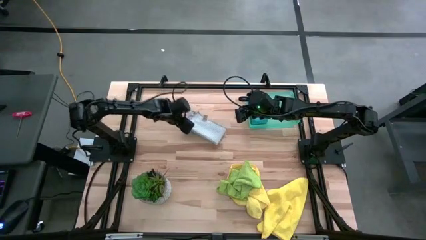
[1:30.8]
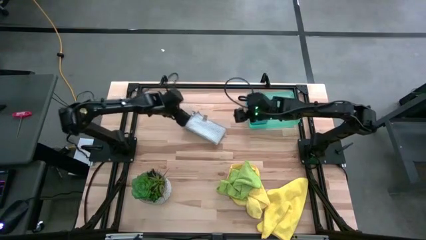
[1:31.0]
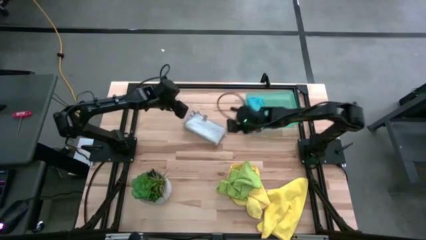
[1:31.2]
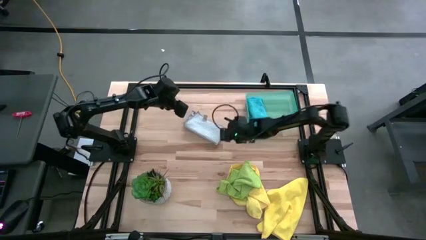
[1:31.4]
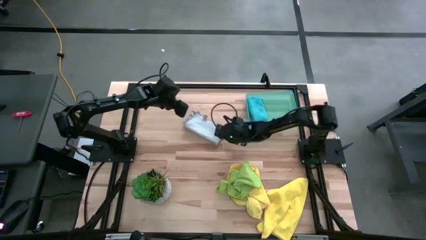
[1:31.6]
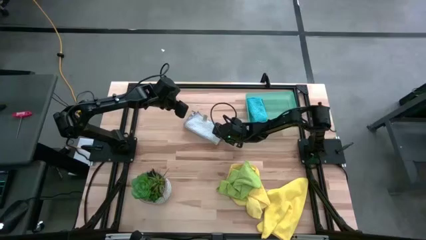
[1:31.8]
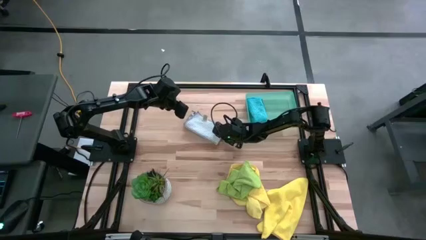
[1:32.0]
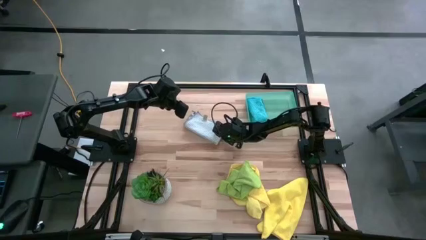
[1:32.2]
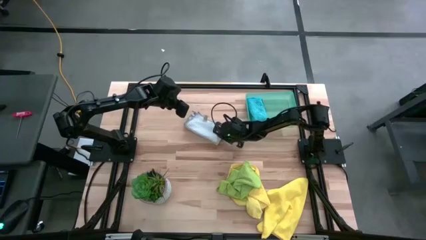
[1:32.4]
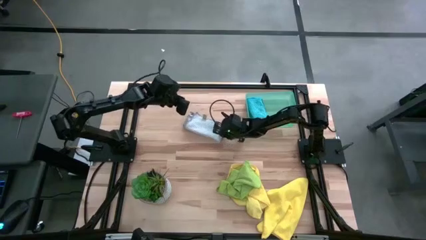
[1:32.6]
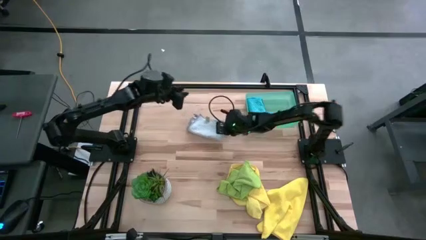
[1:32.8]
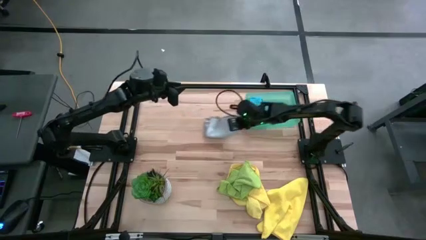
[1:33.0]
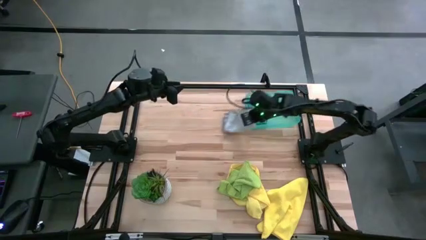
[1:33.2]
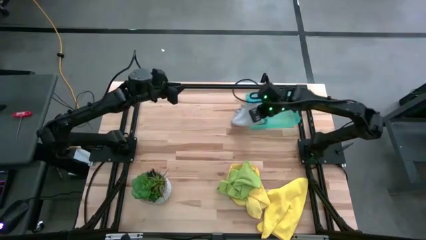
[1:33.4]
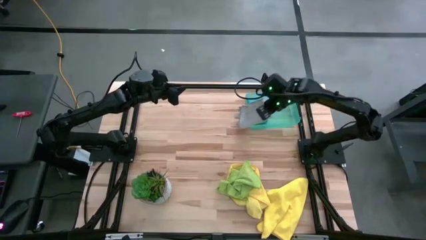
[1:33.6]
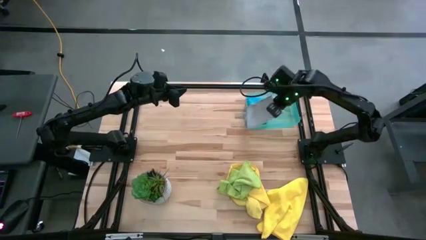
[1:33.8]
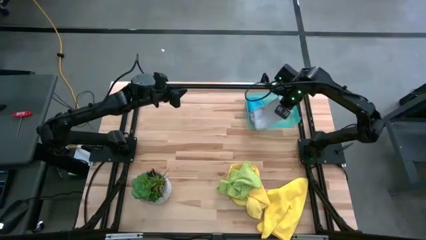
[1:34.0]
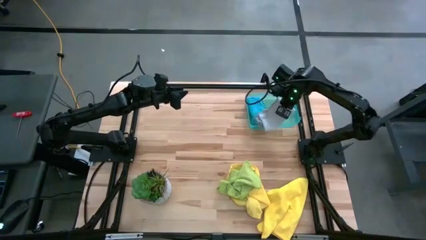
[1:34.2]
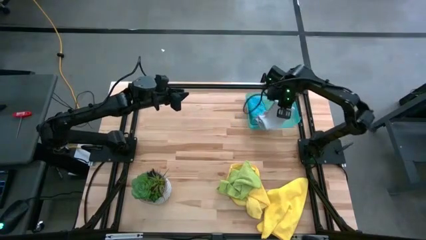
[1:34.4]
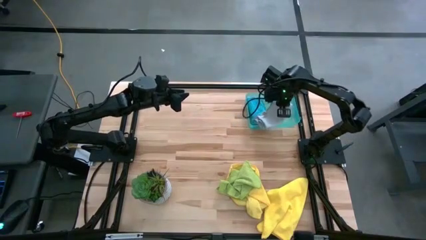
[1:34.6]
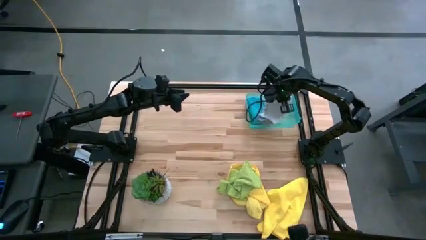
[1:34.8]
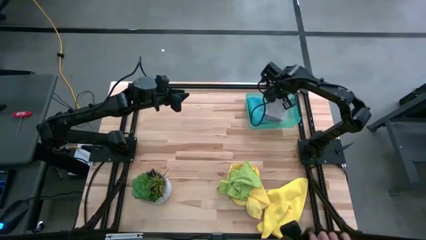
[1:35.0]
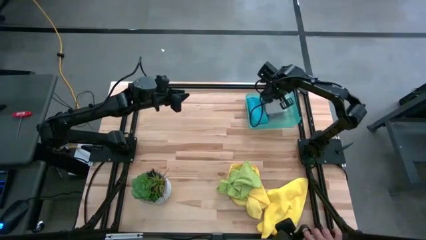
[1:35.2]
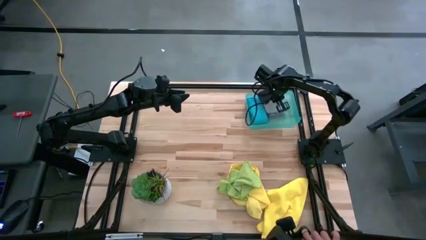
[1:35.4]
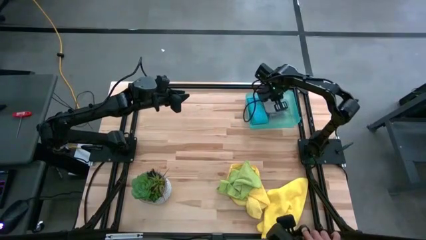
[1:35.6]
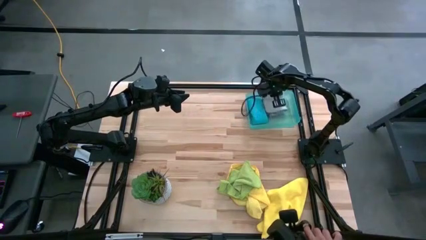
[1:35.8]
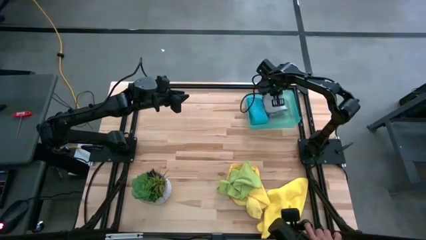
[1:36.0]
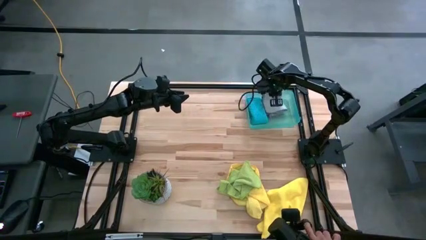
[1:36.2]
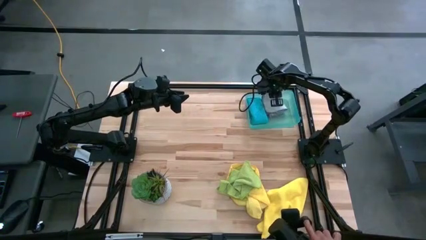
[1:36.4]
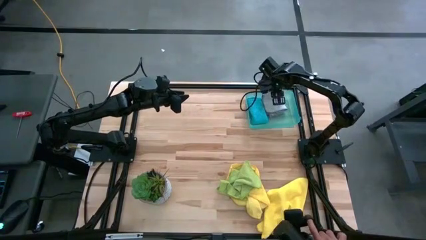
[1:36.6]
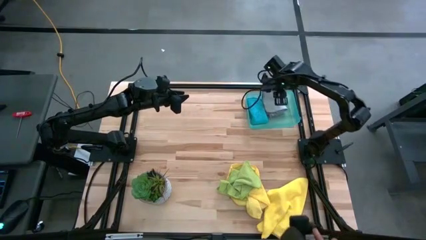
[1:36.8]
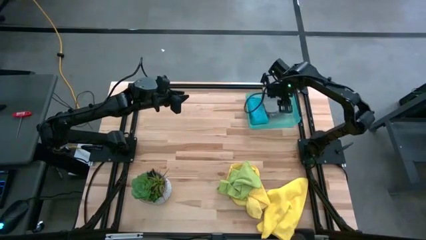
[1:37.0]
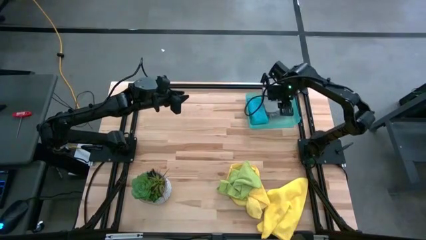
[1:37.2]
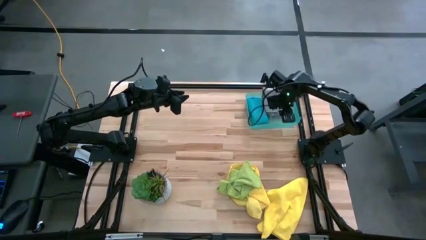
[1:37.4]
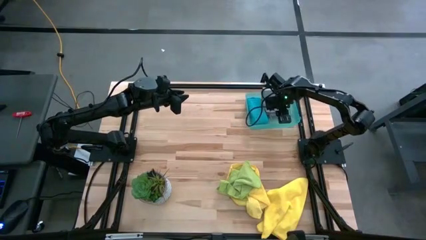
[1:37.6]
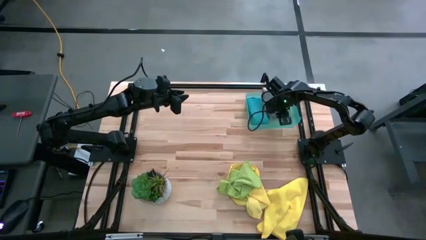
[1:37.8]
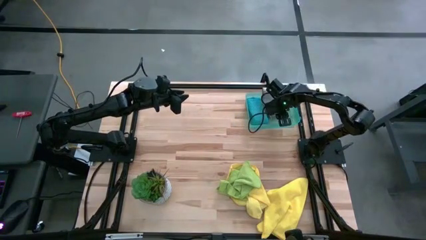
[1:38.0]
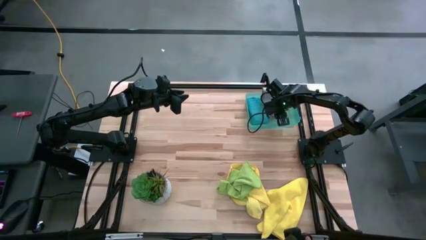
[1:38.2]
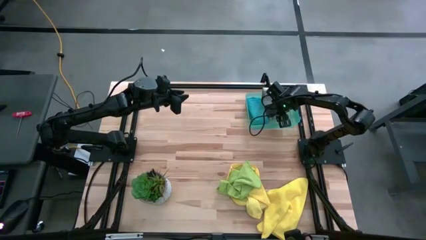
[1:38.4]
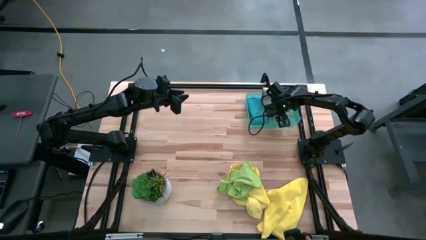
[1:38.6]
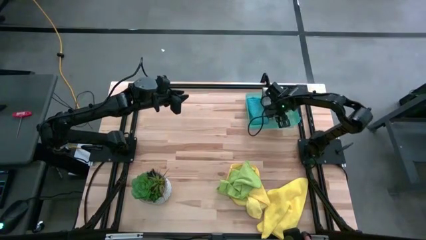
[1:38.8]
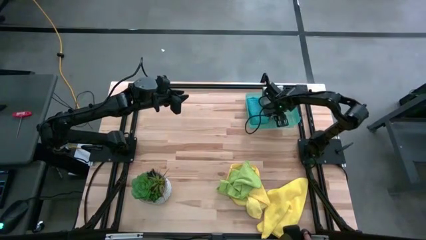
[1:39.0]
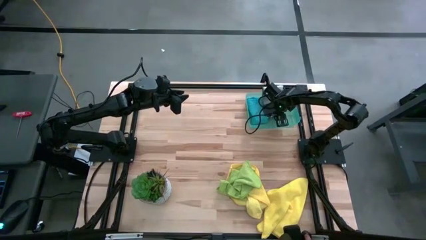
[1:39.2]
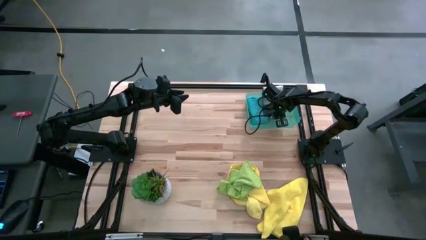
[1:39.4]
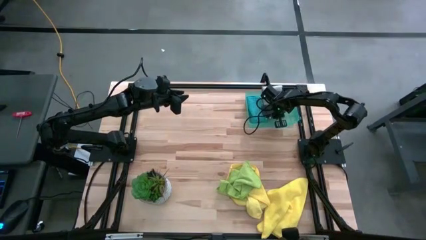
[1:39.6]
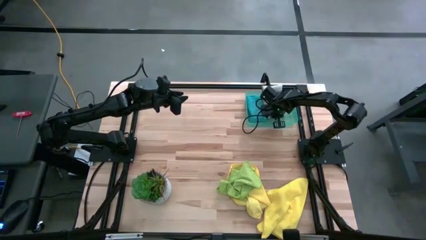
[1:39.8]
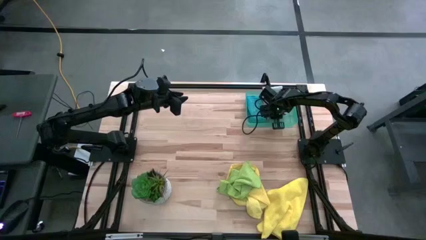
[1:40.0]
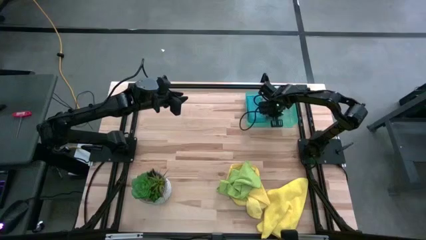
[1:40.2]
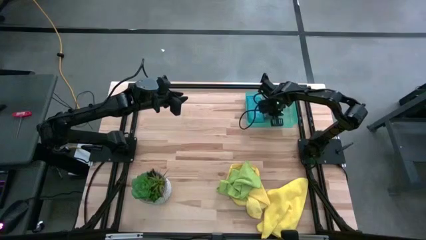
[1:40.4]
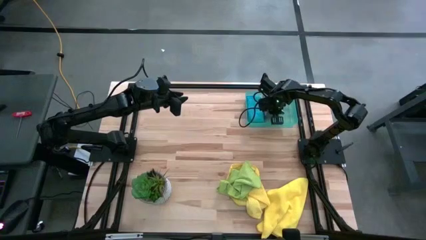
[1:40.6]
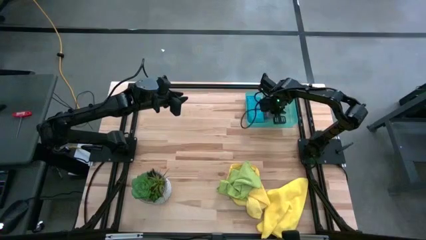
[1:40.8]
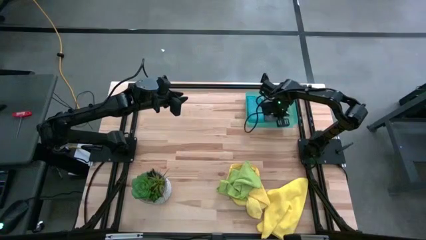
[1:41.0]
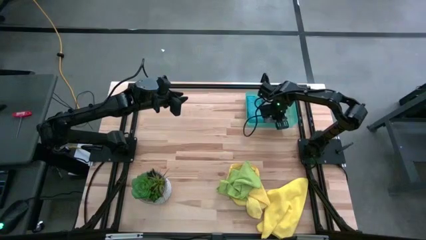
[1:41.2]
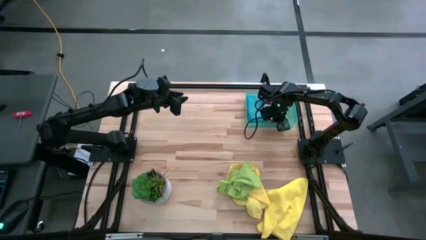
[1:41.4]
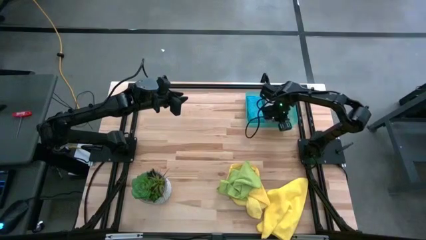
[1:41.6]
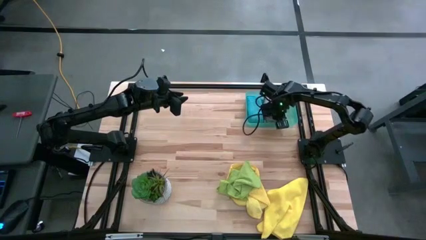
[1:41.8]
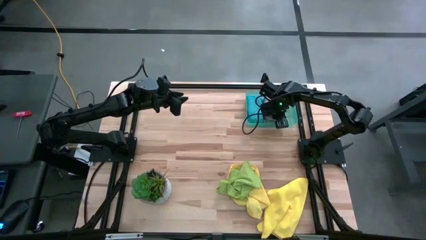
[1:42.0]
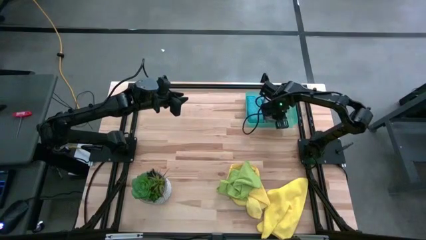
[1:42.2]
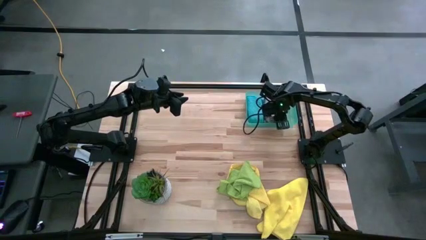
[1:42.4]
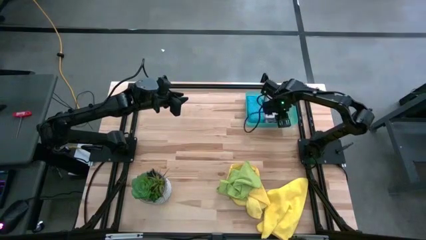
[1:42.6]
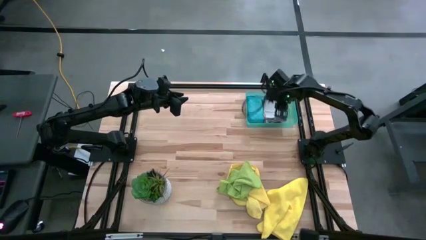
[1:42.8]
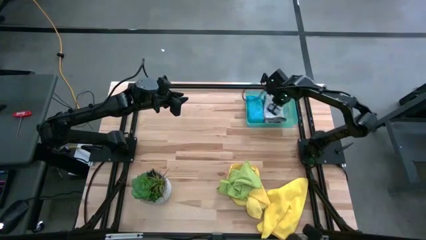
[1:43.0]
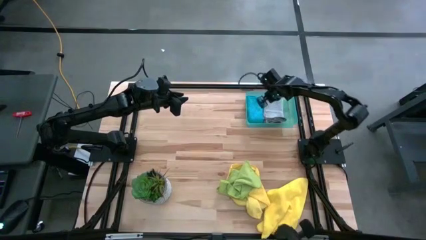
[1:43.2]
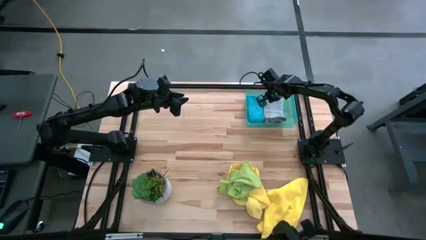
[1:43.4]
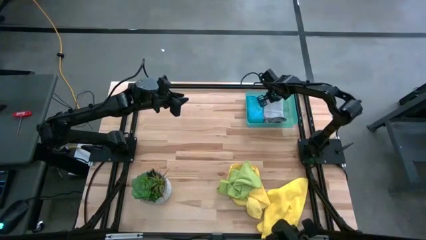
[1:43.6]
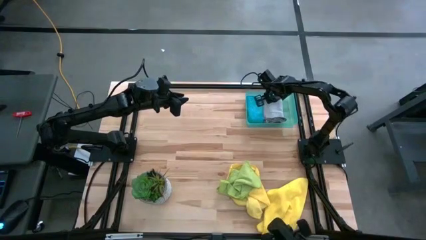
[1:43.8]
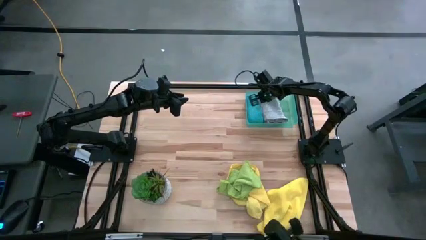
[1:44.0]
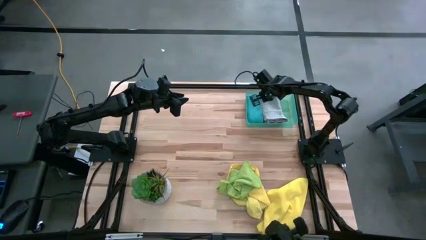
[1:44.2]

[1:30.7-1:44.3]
Task: Fold microfiber towels
Put the gray towel into the green bin

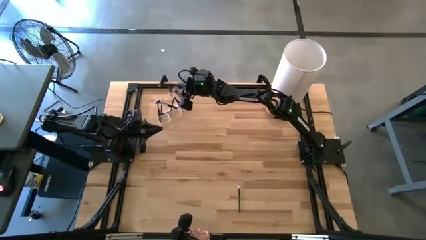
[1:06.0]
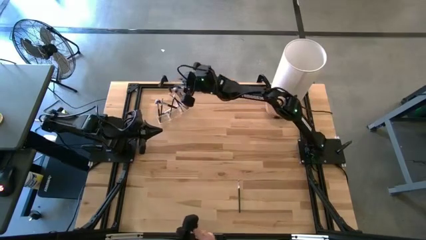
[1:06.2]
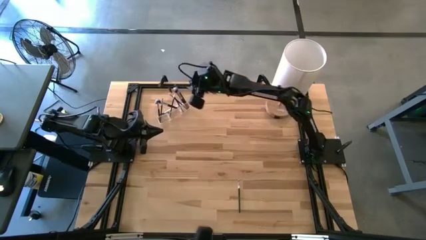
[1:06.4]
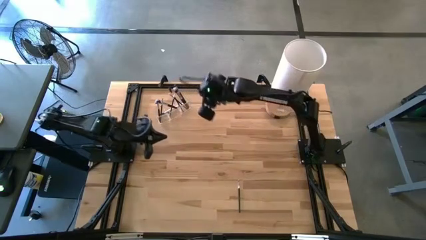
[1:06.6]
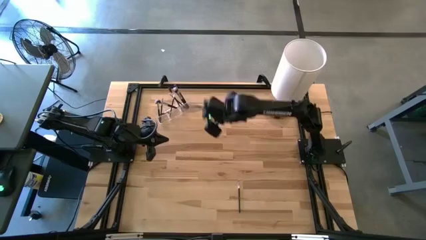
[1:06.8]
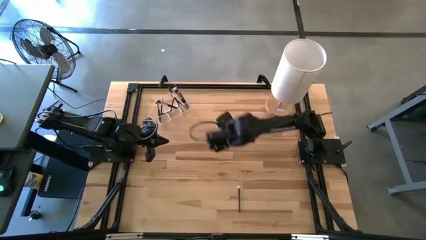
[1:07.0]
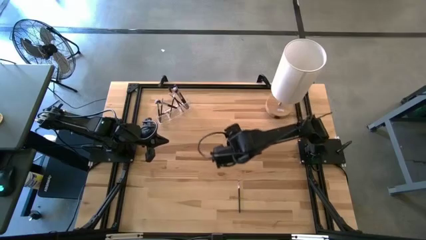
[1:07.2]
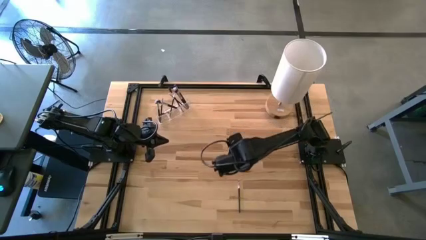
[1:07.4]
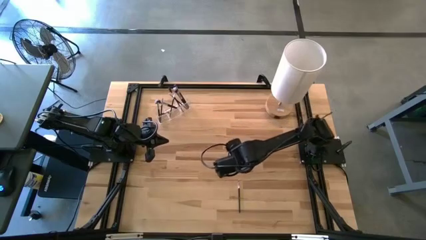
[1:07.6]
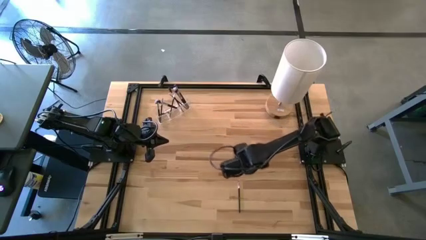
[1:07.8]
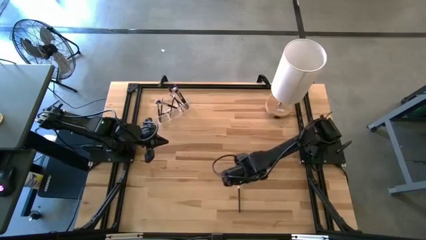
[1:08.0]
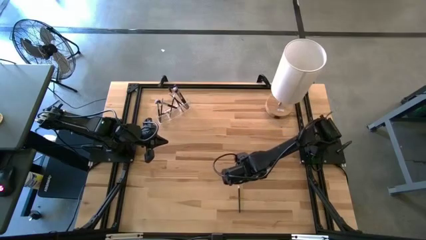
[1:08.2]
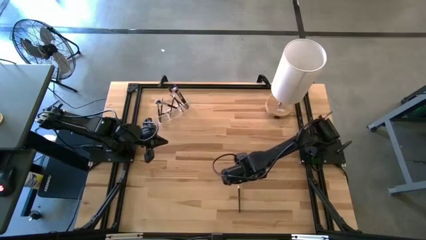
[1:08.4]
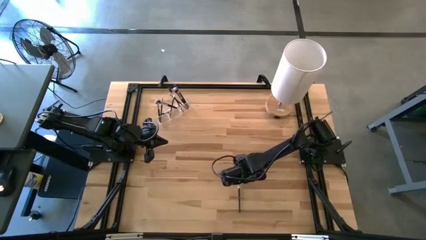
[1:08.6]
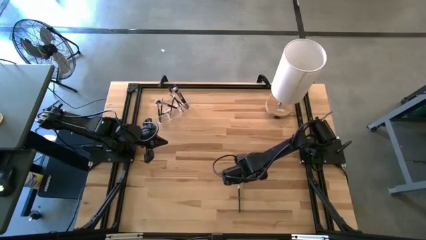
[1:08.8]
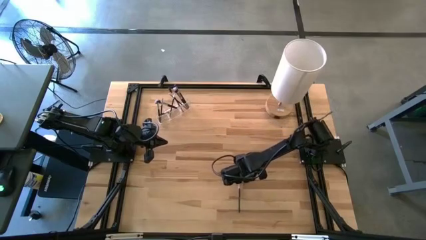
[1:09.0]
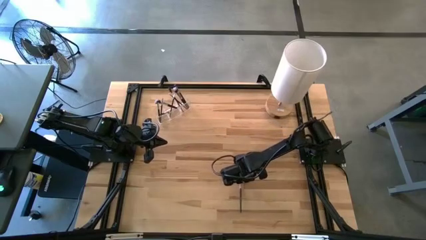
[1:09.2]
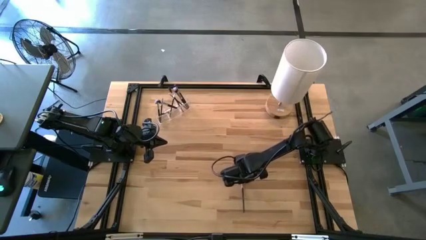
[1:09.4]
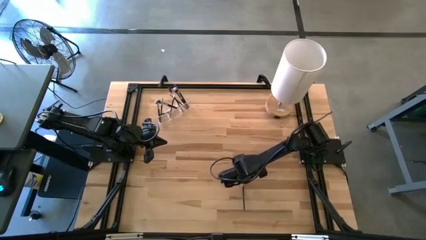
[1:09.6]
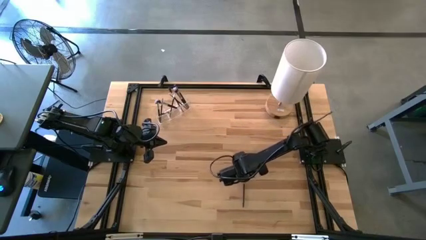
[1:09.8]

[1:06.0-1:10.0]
Task: Put items in baskets/containers
Put the eyeshadow brush into the transparent organizer
